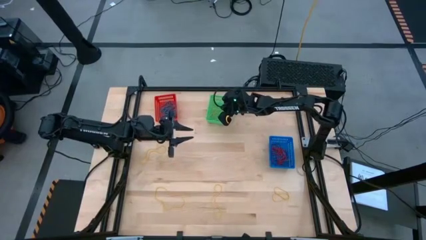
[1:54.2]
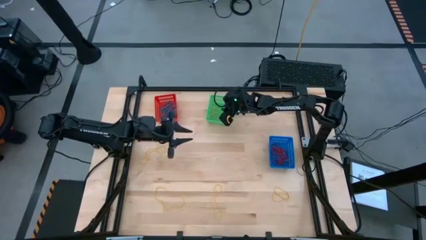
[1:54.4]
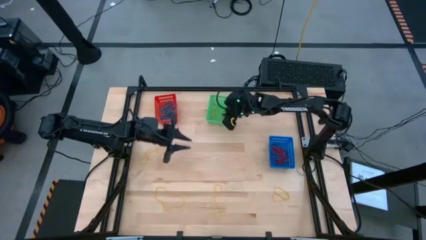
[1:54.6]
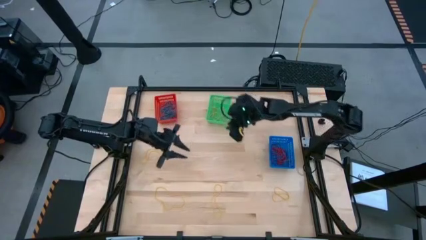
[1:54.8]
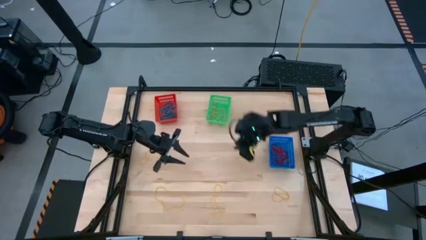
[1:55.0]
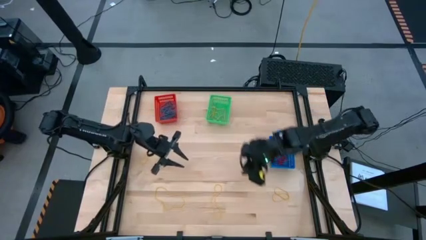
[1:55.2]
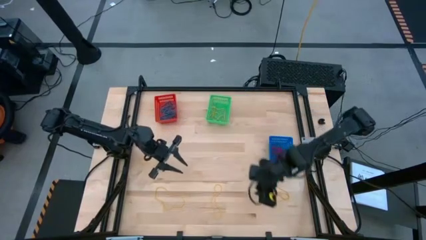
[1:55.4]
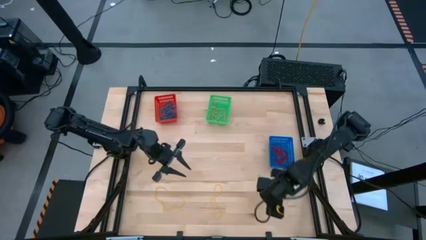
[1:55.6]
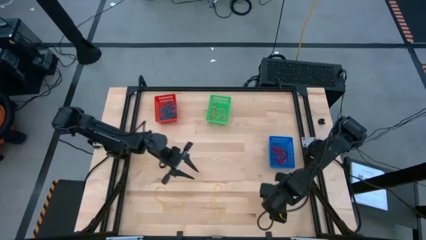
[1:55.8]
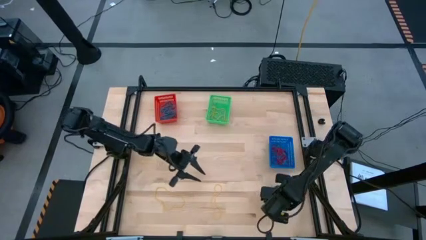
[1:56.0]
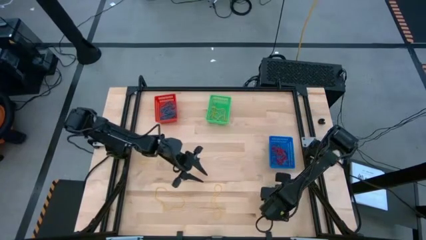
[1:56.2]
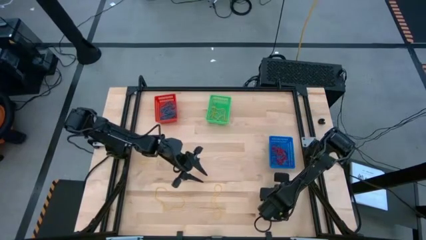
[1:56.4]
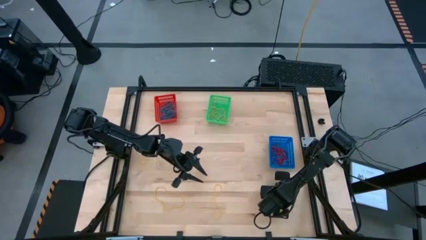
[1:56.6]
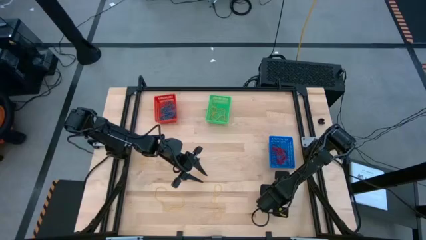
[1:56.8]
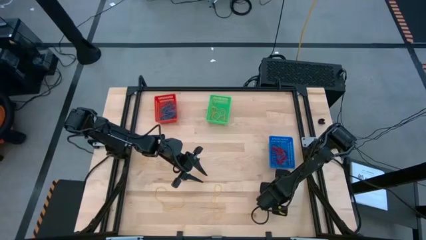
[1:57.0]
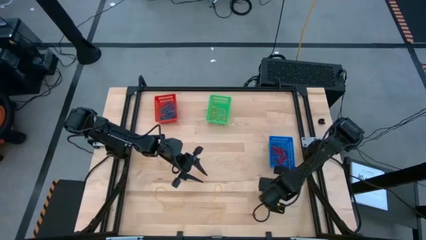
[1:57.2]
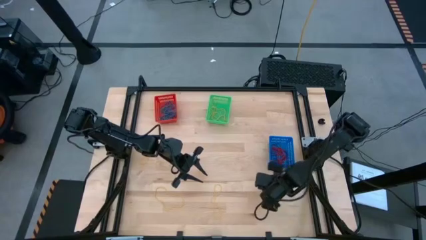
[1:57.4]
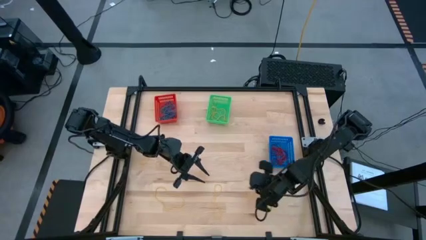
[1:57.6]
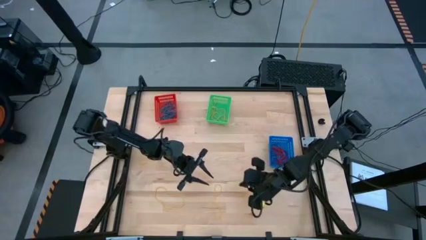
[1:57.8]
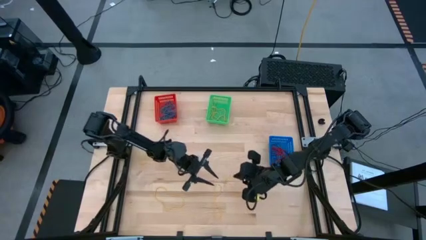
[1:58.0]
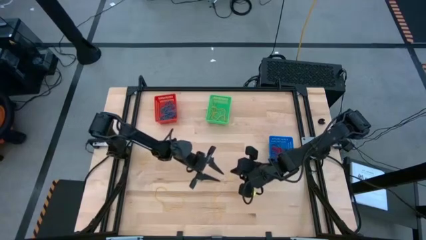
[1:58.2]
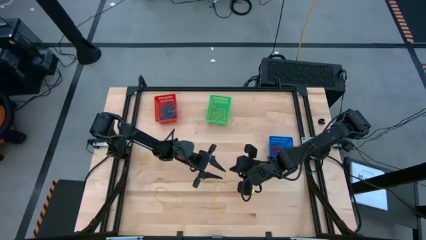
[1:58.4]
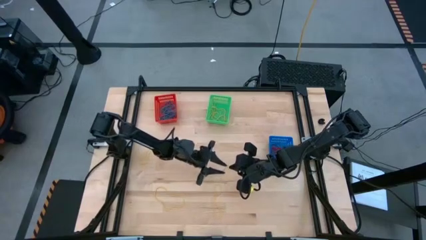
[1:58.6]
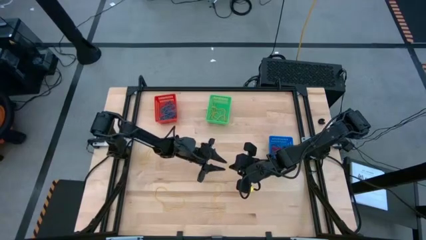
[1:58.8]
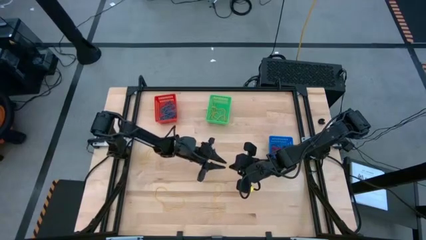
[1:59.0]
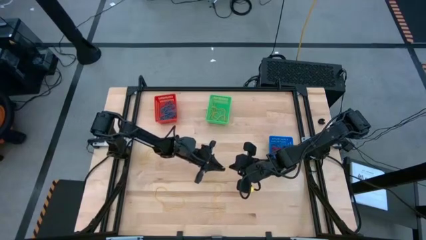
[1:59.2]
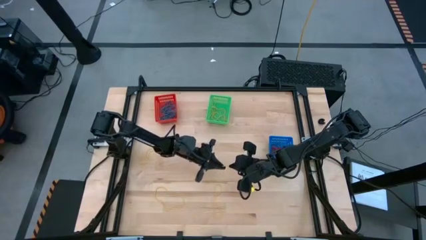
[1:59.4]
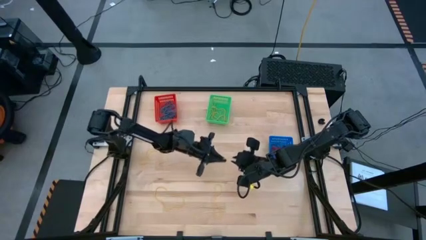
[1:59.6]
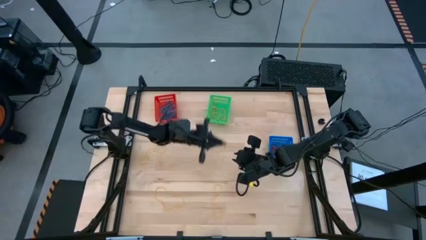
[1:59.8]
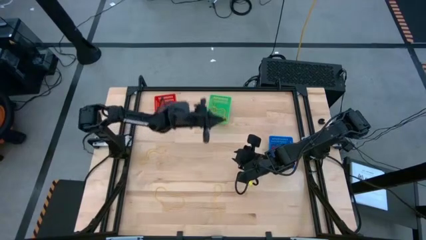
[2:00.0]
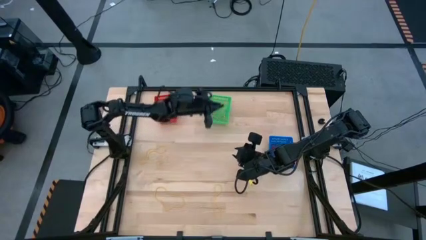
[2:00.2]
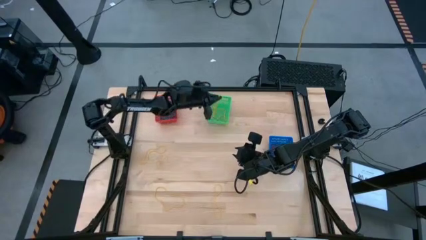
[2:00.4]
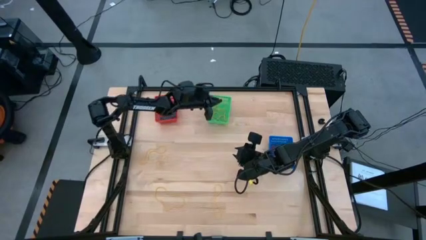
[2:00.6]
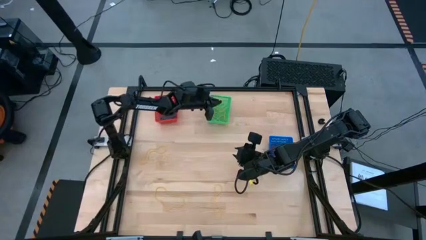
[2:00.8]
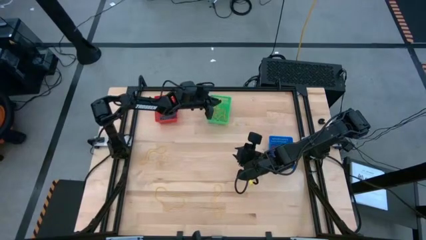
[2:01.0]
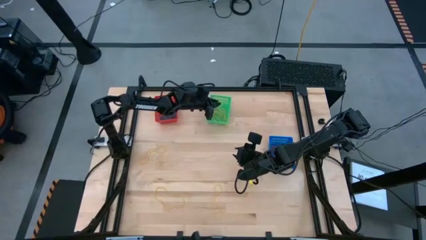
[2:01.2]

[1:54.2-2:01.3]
Task: Sort rubber bands into baskets
Put the yellow rubber band into the green bin

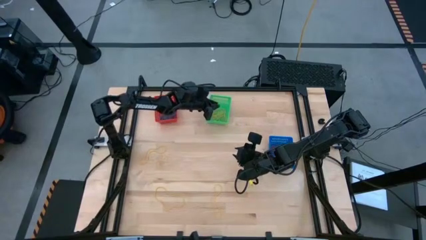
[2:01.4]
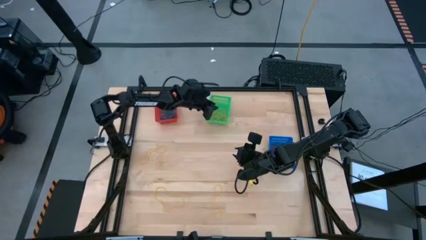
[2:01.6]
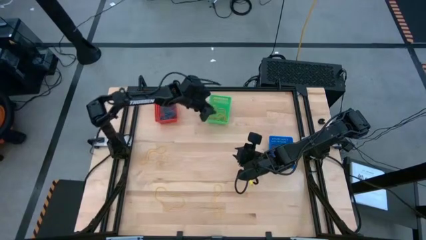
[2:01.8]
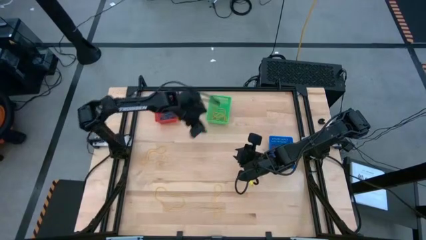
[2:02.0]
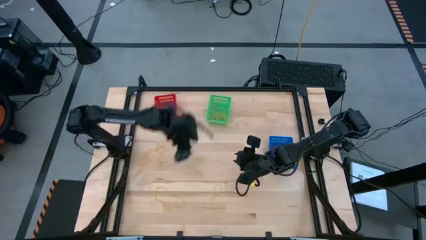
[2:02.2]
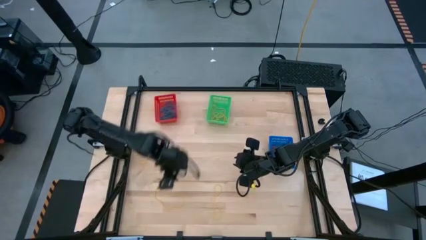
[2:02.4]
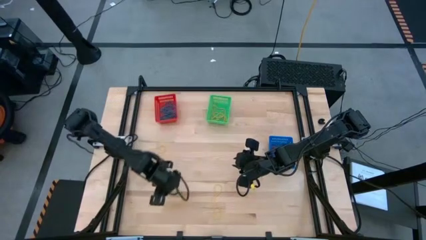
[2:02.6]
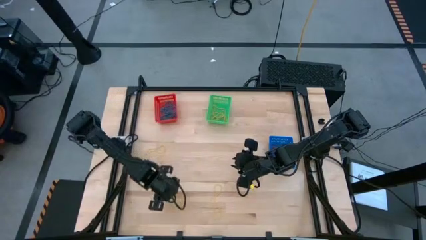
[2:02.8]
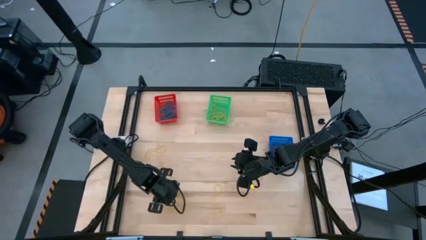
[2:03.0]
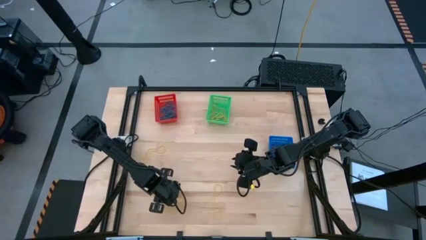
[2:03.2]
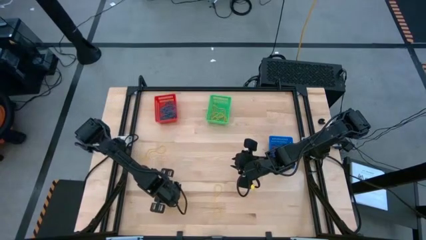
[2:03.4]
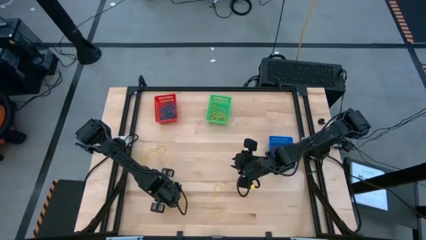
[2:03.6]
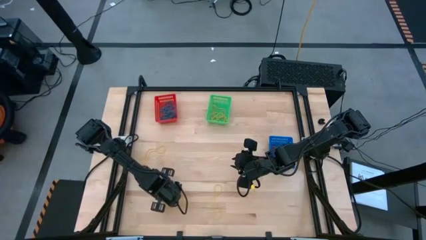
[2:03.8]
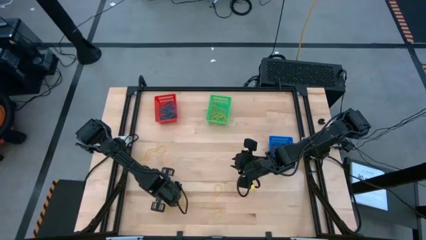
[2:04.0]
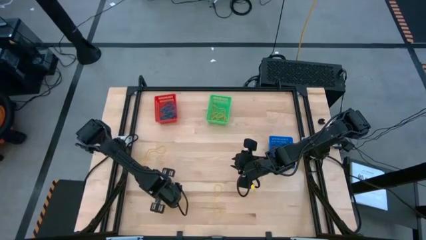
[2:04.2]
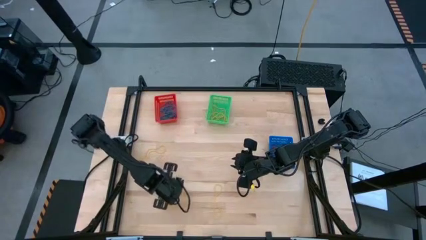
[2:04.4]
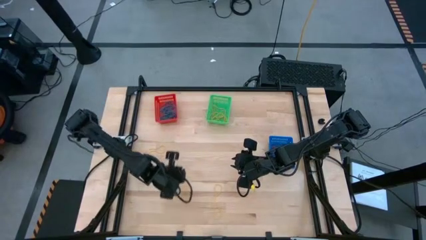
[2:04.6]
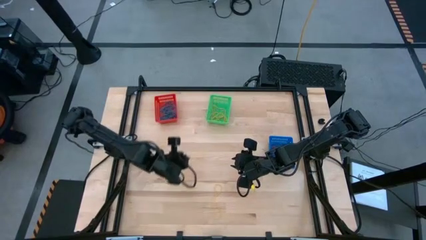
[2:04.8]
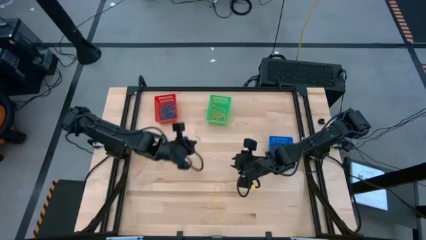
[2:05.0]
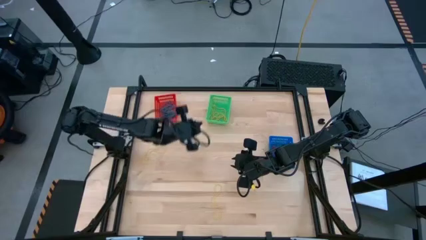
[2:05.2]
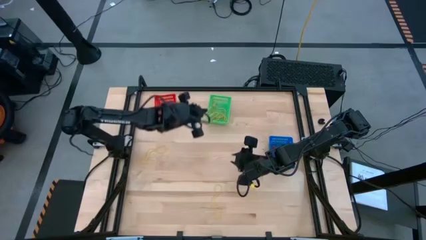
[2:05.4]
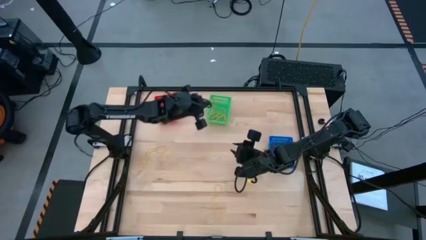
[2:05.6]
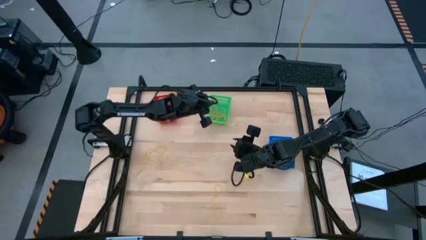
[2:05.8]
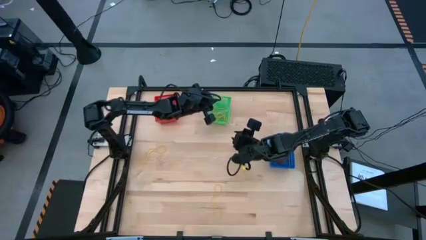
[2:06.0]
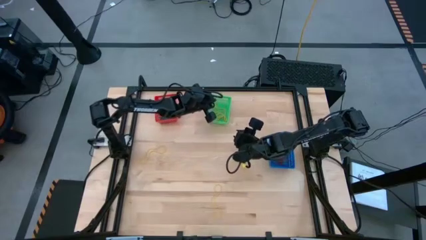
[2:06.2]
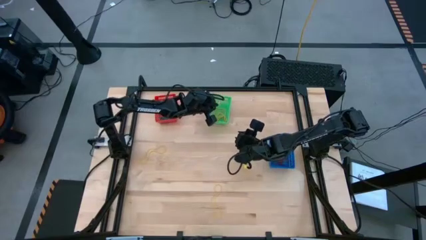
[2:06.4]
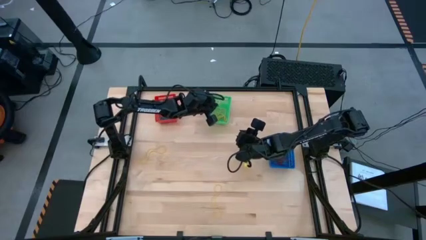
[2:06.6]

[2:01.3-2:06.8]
Put the yellow rubber band into the green bin

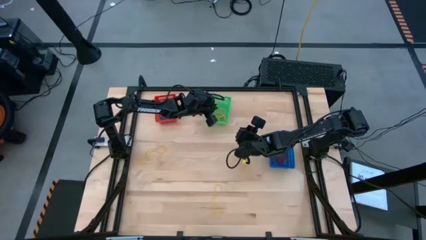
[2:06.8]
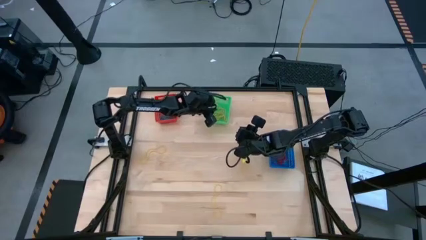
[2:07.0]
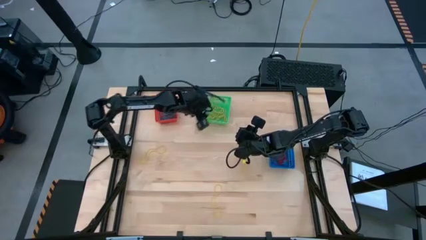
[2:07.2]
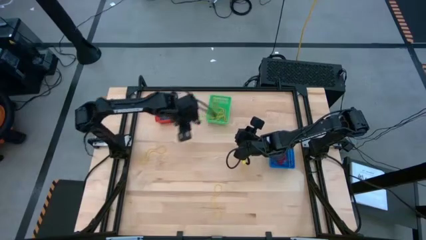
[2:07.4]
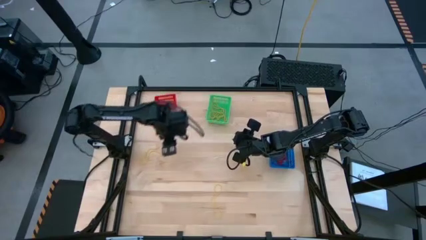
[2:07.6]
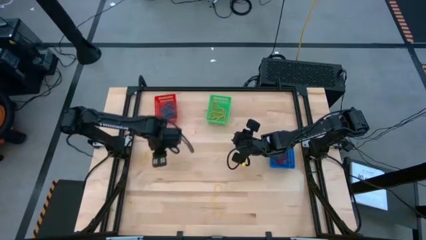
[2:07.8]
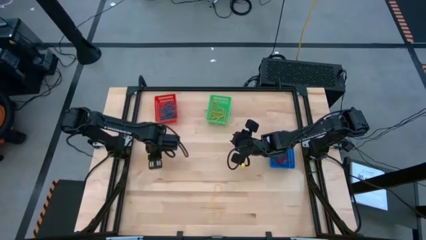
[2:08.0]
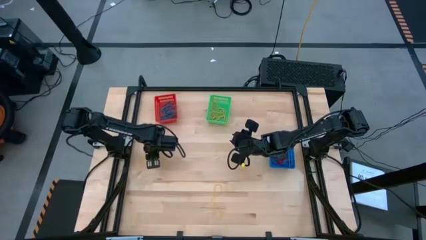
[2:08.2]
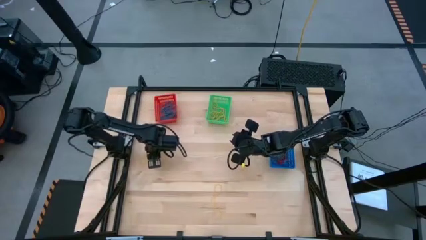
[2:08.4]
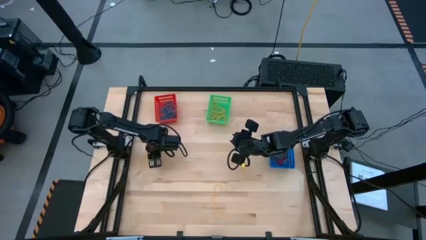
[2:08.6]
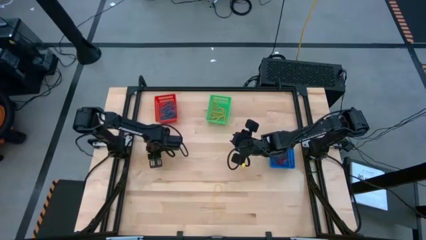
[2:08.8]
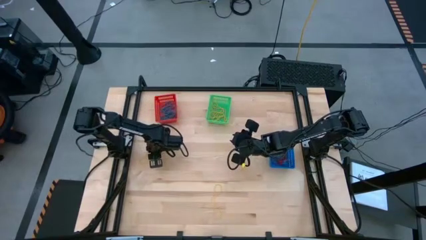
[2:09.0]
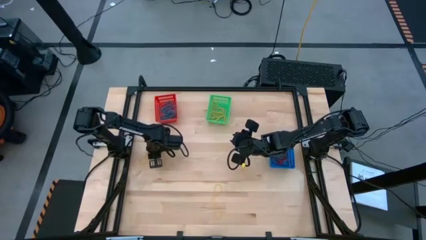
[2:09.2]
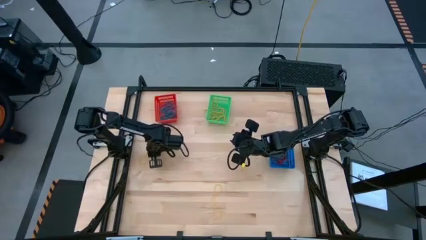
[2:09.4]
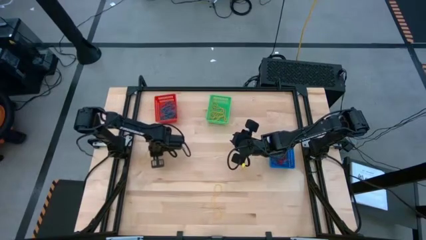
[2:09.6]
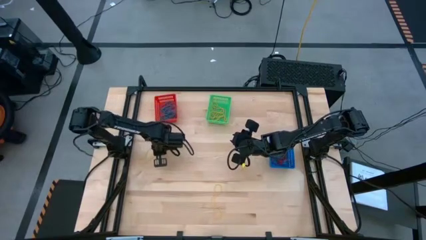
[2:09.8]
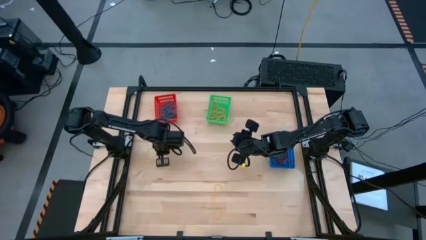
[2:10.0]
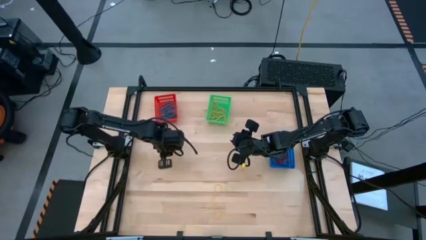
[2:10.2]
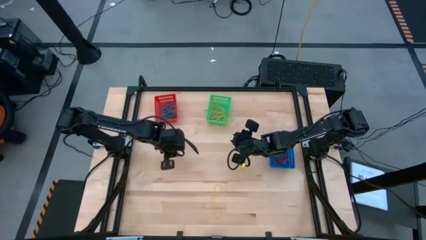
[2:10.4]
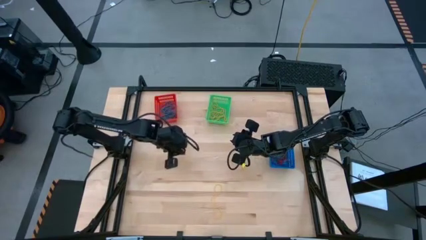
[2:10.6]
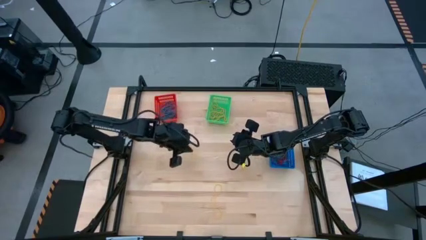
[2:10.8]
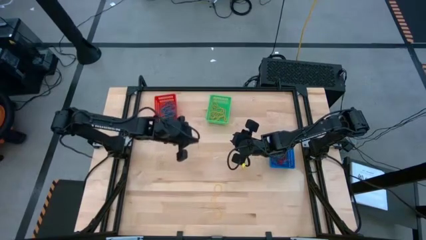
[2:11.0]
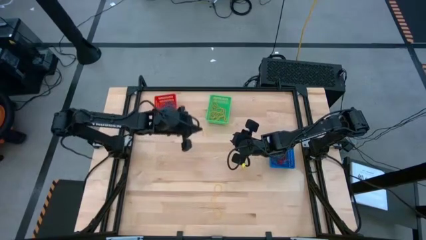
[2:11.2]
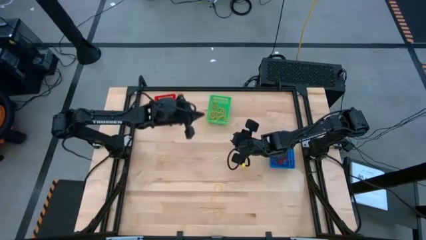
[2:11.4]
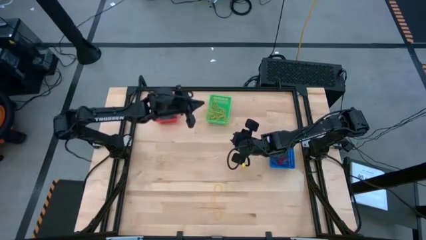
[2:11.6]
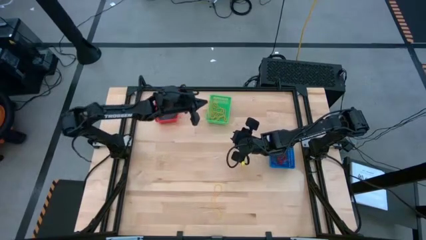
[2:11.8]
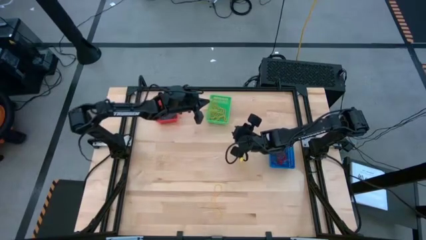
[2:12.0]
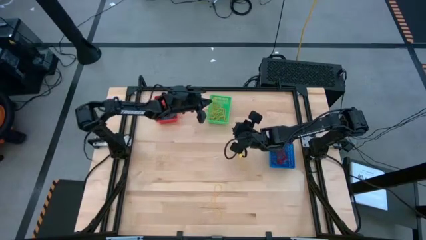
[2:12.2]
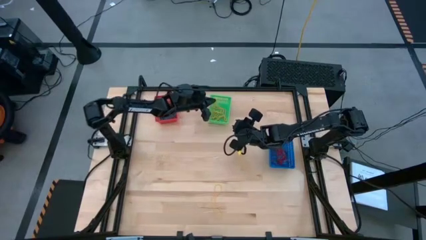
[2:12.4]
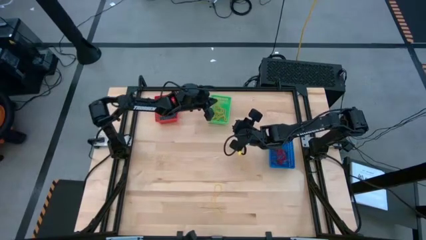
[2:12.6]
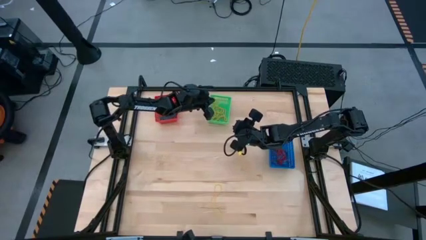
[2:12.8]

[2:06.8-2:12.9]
Put the yellow rubber band into the green bin
